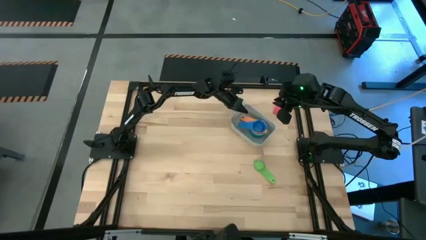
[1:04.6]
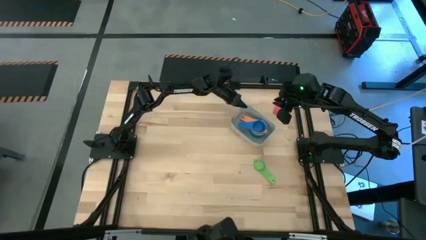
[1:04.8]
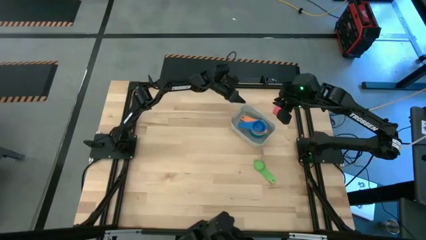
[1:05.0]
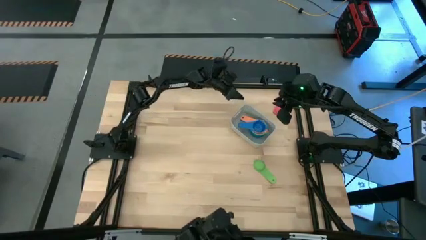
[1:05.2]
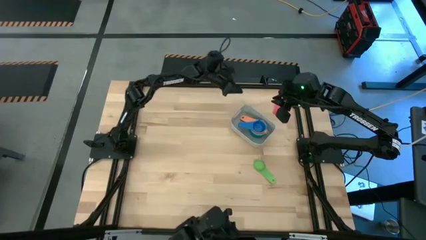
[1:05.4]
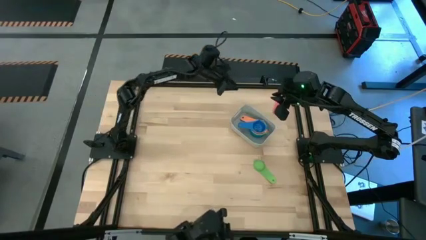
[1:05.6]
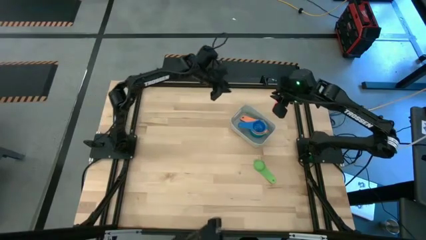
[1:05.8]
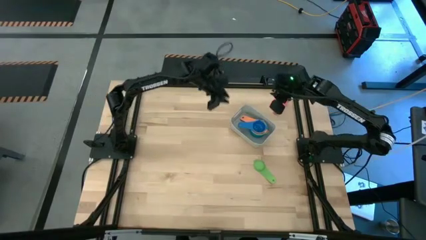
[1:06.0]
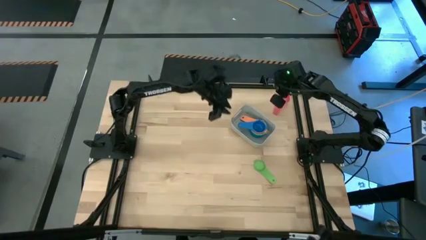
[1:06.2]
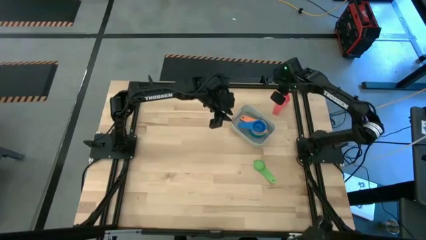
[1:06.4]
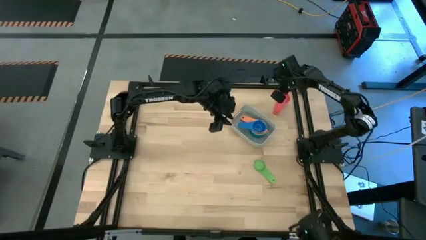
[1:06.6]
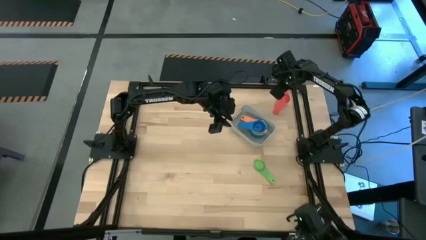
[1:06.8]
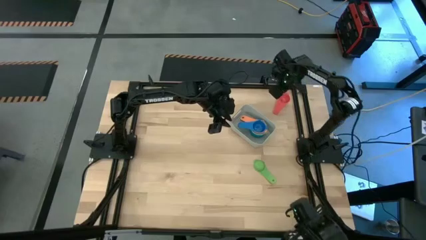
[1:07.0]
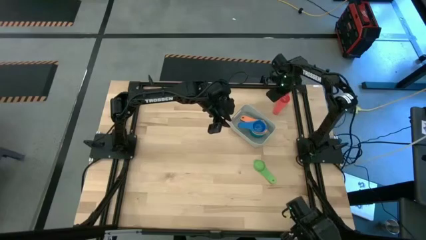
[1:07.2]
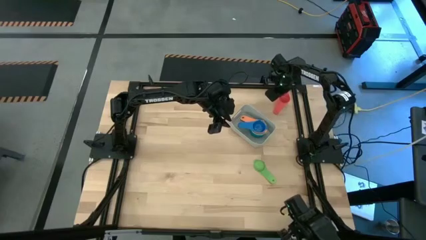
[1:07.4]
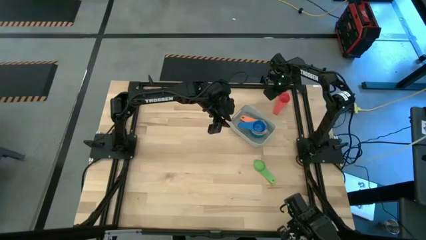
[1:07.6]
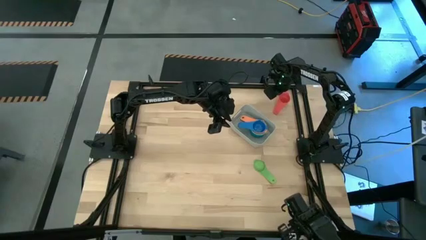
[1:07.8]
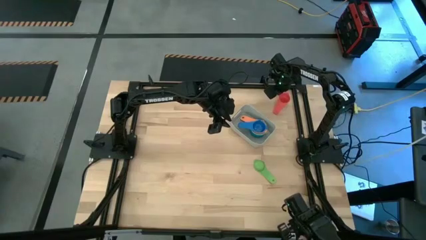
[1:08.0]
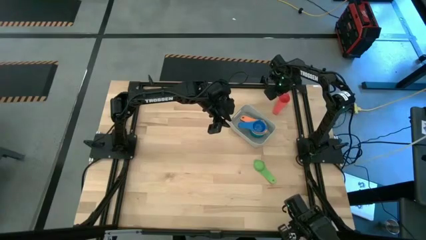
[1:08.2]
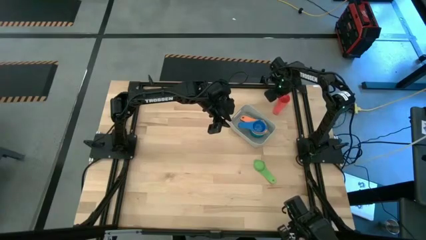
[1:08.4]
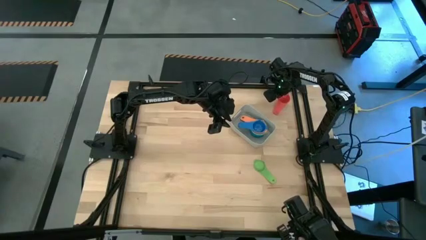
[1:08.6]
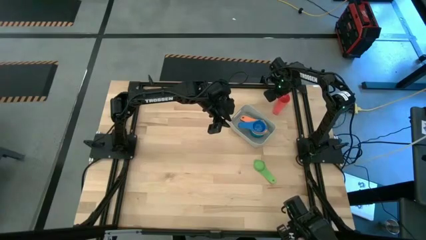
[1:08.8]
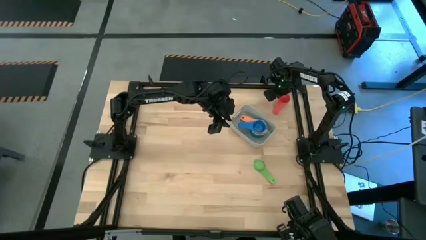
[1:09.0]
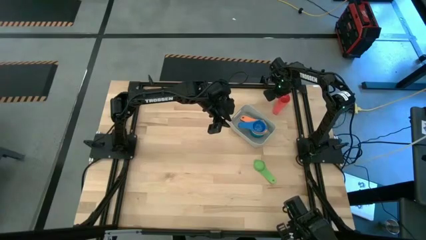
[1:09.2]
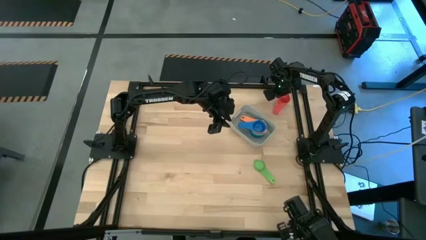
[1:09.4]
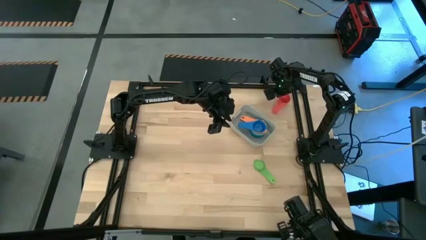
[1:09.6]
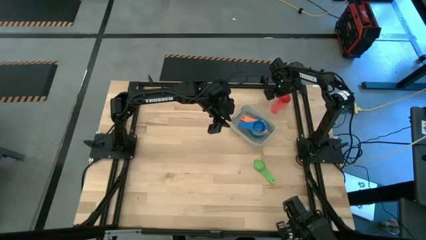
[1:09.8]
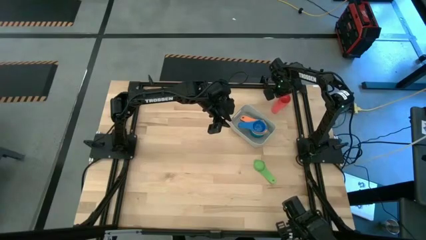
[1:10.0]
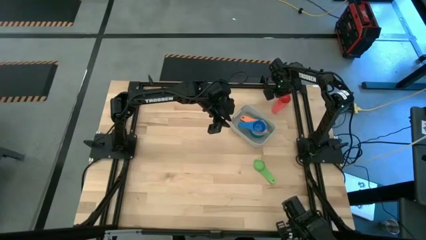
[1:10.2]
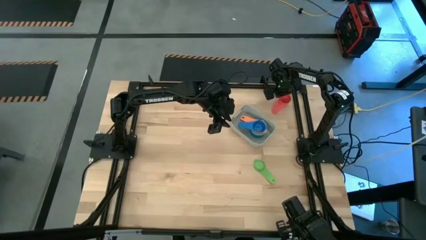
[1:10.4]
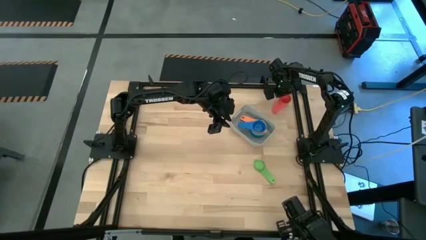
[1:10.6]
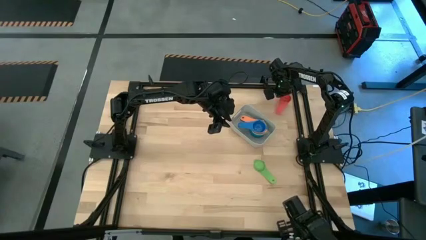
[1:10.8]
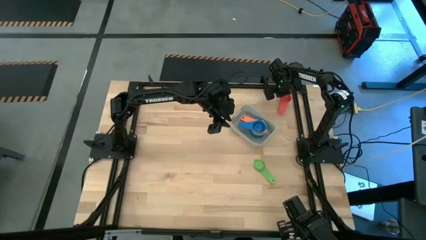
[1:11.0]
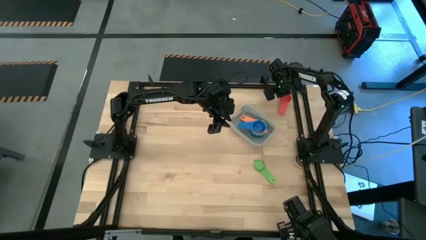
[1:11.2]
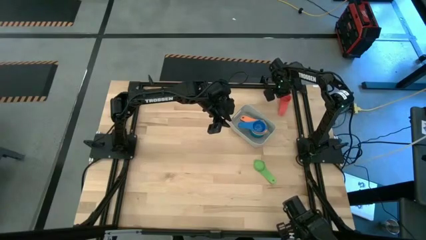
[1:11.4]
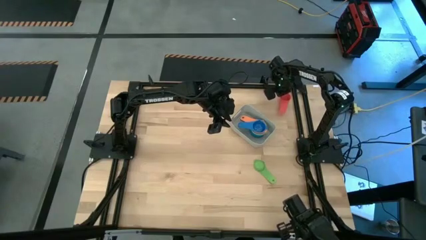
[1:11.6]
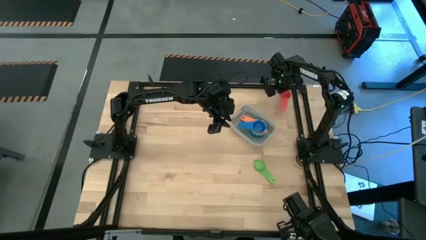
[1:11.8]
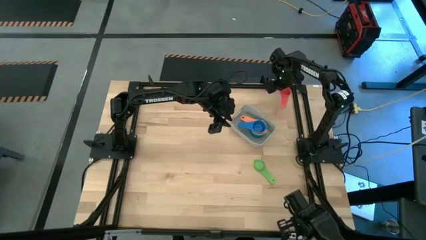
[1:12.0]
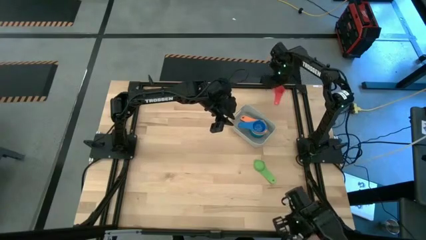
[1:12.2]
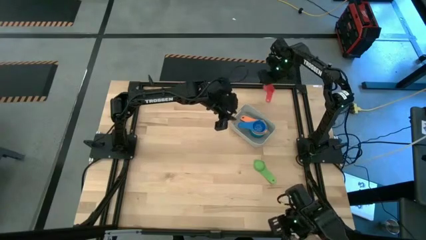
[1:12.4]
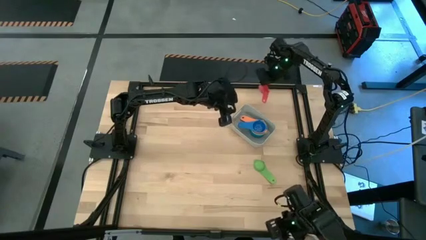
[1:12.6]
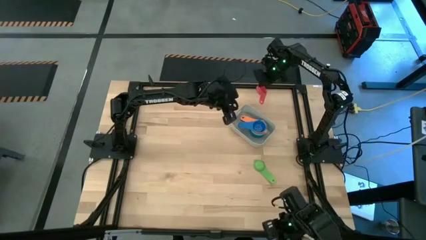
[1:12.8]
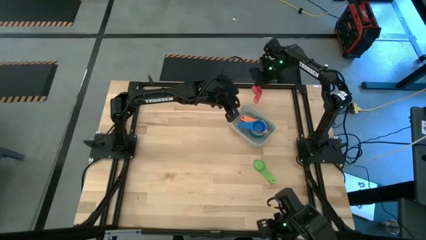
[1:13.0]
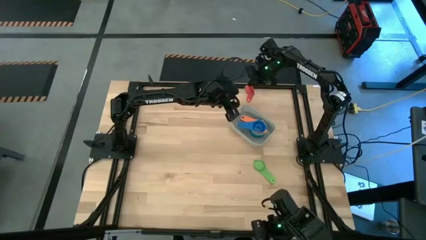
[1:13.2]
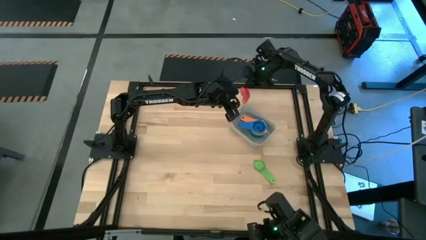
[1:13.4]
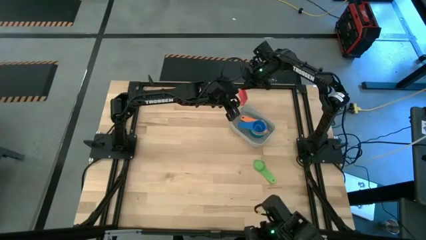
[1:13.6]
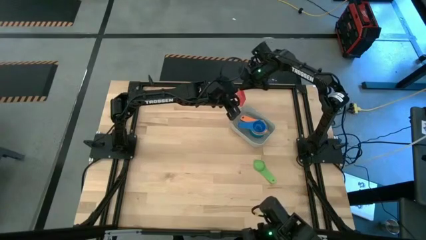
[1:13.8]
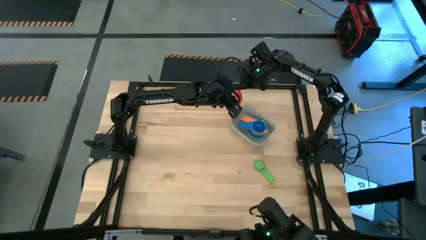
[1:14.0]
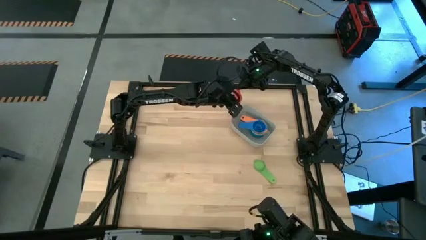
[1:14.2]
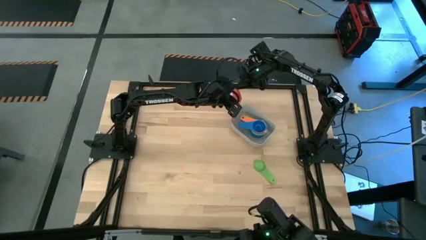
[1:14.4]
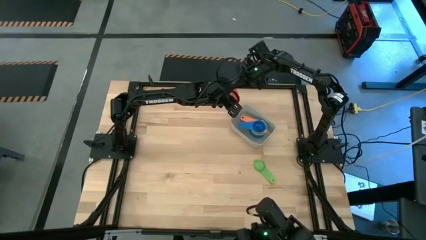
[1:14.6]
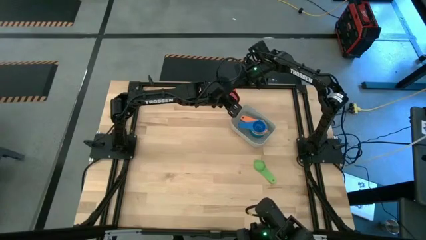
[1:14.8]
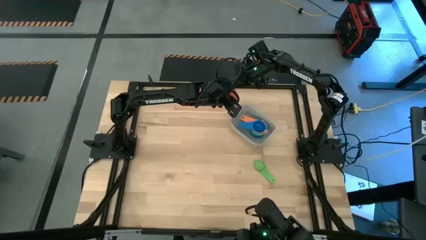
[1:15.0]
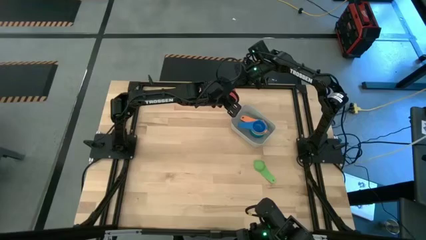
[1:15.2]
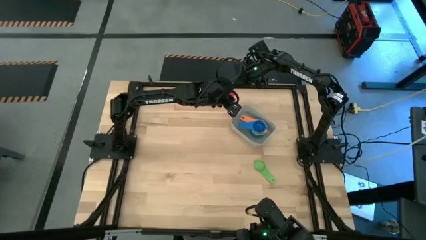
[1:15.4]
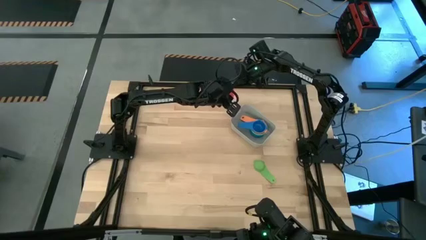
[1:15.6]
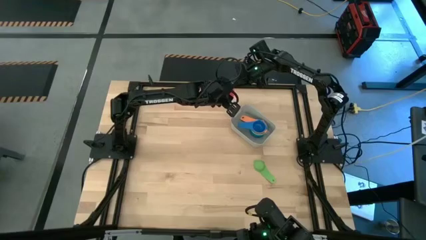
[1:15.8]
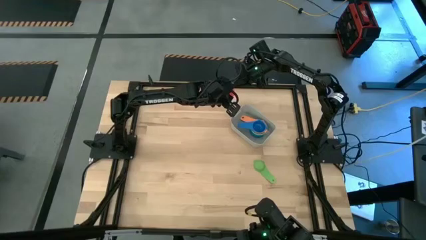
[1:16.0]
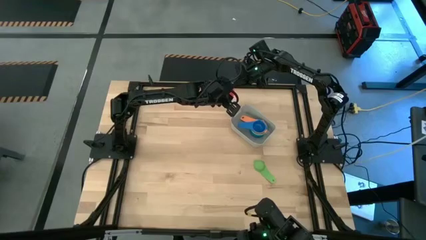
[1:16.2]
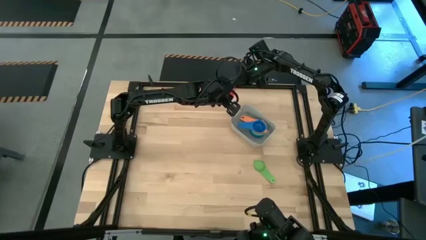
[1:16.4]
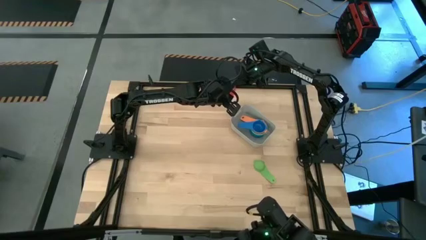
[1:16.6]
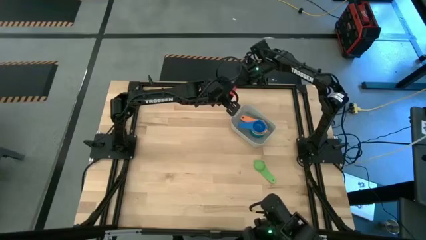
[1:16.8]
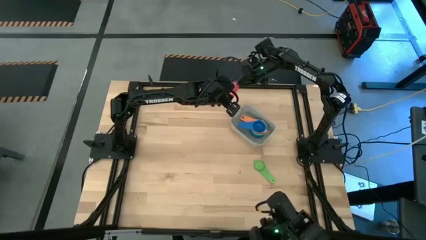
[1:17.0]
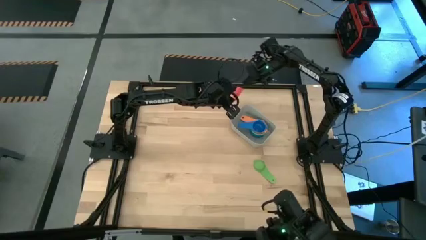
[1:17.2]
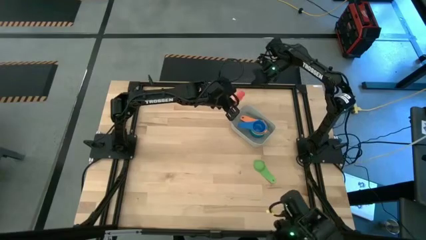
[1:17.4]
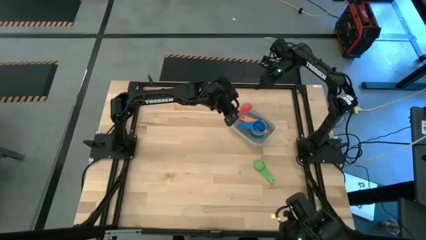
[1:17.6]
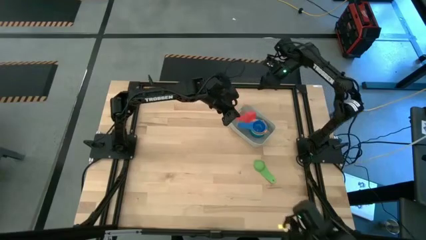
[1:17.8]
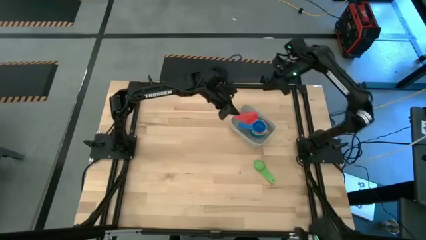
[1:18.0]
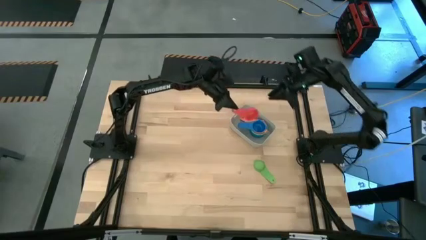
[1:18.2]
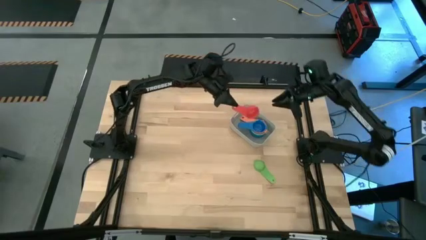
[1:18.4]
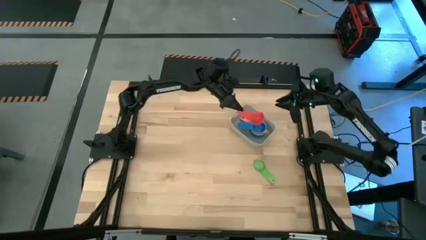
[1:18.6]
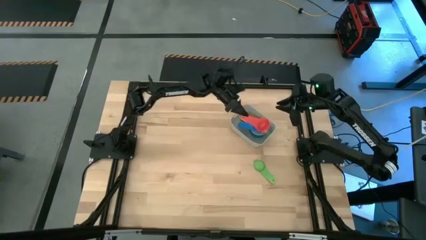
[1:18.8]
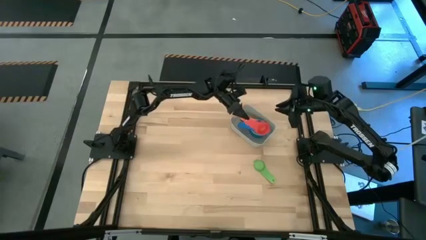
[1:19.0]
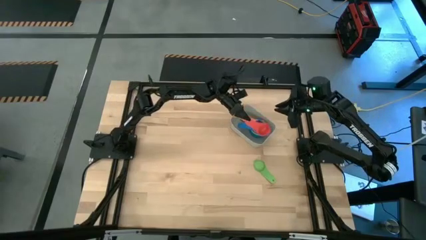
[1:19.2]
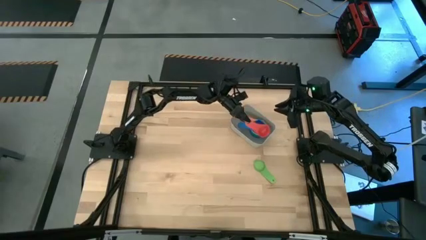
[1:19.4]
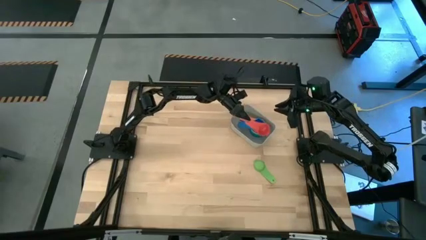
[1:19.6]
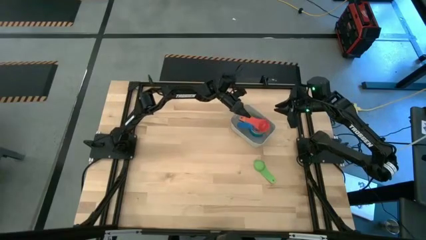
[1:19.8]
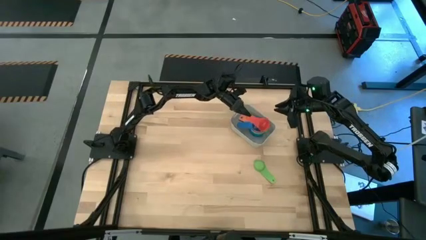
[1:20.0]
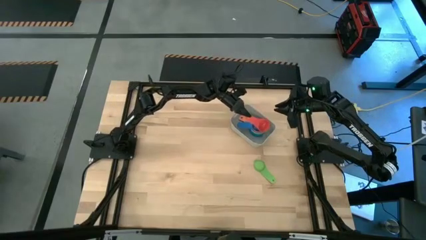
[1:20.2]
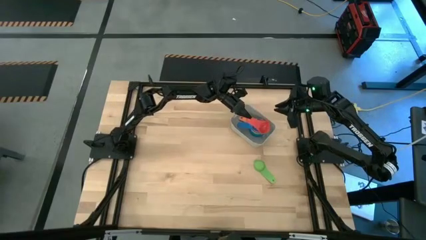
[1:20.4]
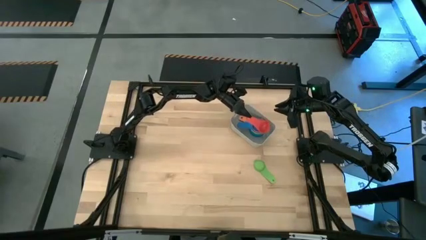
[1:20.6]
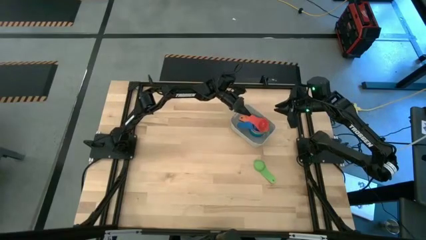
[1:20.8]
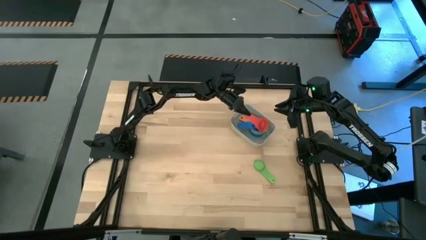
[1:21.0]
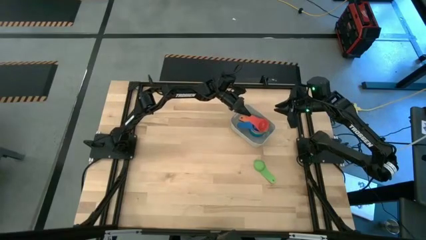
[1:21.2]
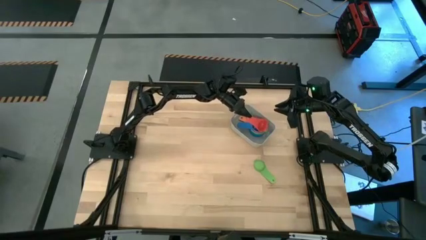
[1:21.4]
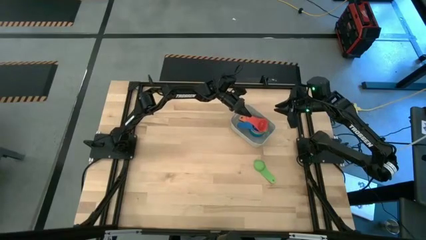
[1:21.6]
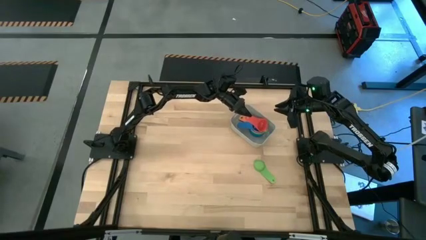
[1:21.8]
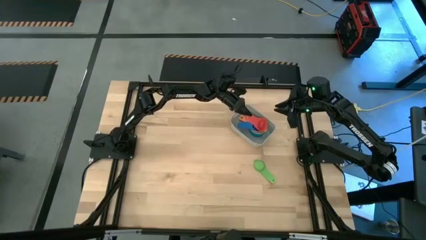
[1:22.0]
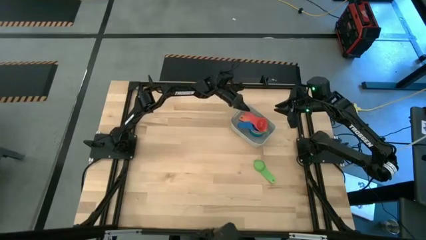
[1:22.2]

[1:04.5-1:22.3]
Task: Nest measuring cups in basket
Stack the red measuring cup on top of the blue measuring cup in the bin
